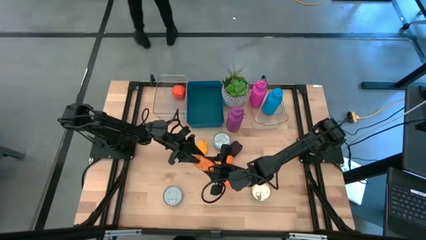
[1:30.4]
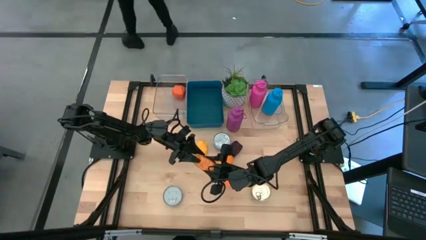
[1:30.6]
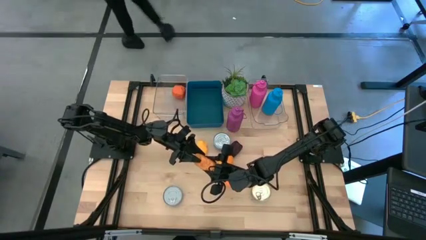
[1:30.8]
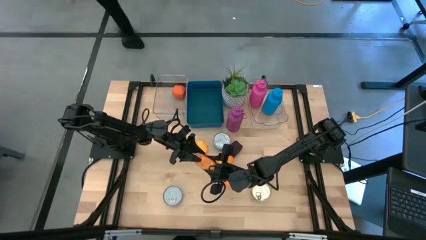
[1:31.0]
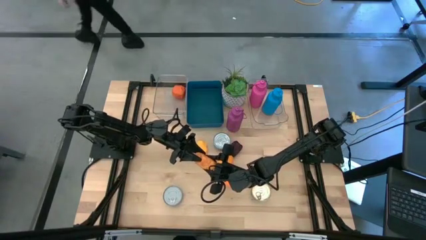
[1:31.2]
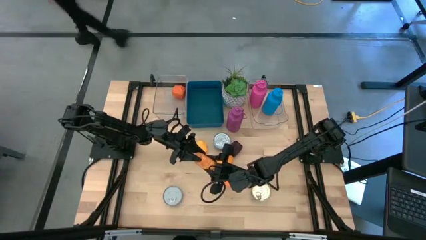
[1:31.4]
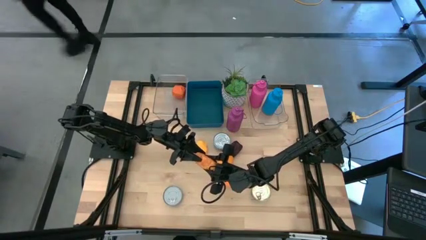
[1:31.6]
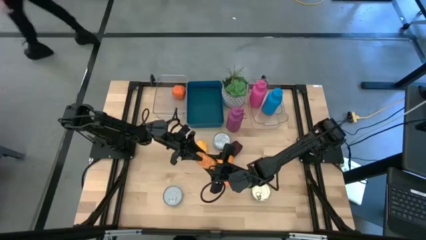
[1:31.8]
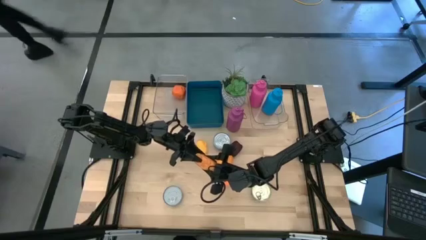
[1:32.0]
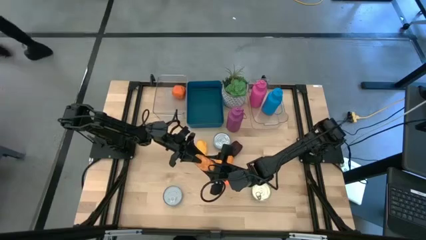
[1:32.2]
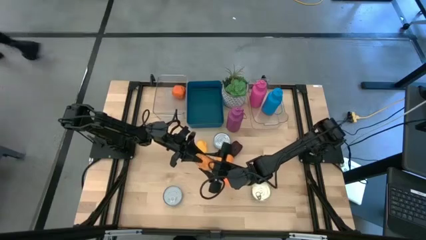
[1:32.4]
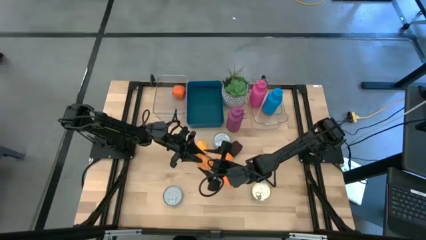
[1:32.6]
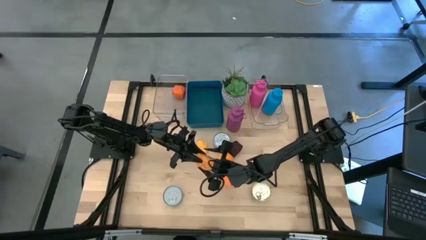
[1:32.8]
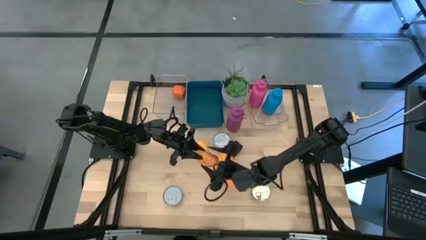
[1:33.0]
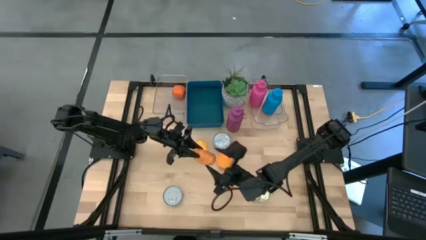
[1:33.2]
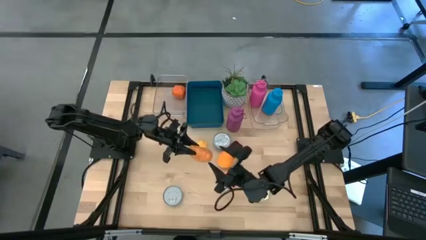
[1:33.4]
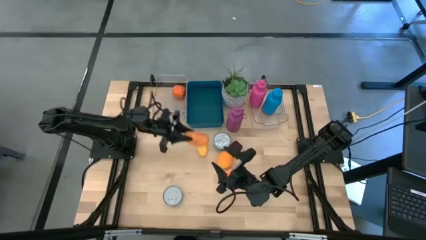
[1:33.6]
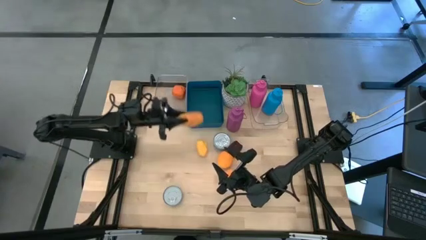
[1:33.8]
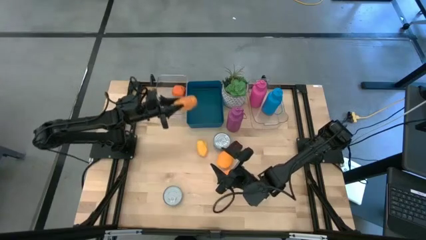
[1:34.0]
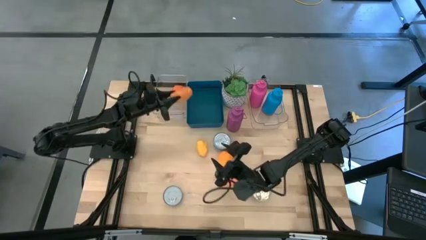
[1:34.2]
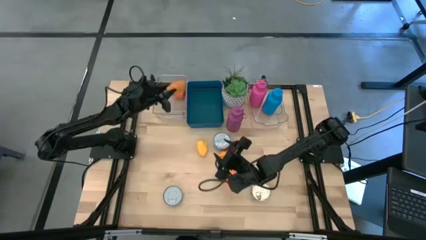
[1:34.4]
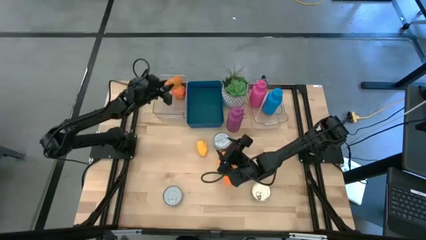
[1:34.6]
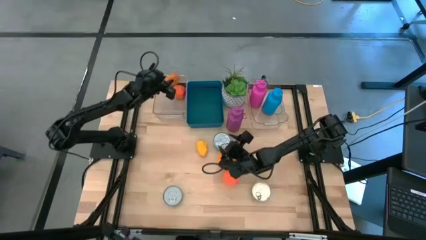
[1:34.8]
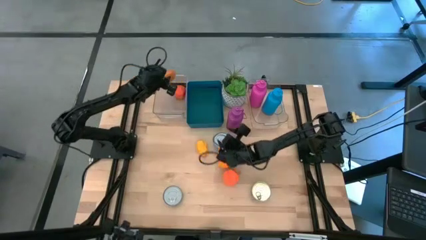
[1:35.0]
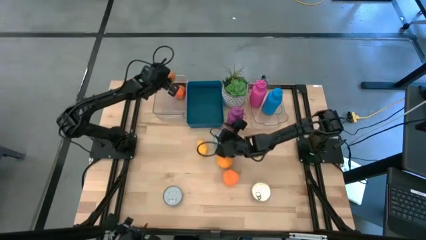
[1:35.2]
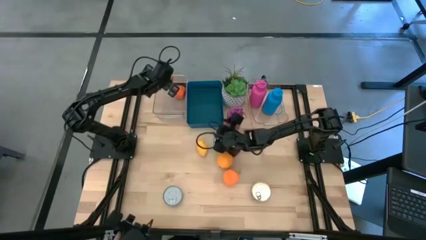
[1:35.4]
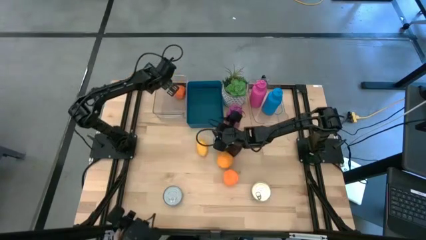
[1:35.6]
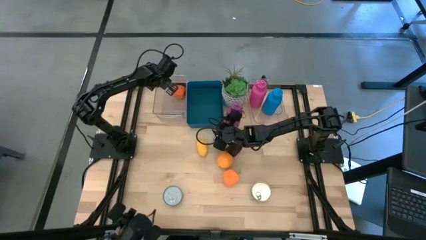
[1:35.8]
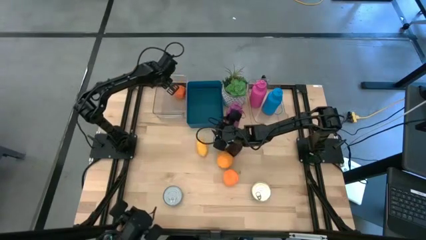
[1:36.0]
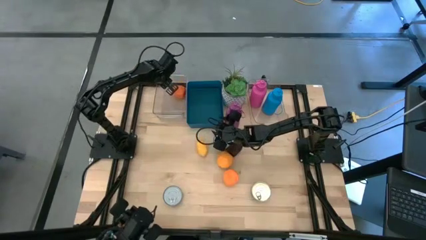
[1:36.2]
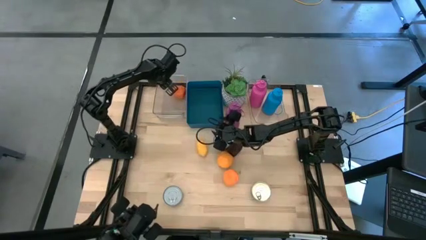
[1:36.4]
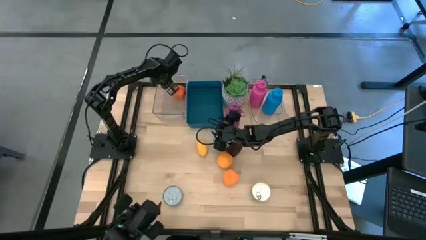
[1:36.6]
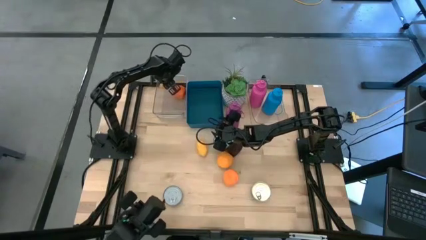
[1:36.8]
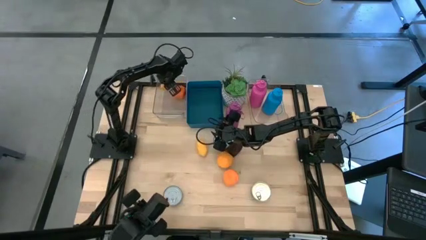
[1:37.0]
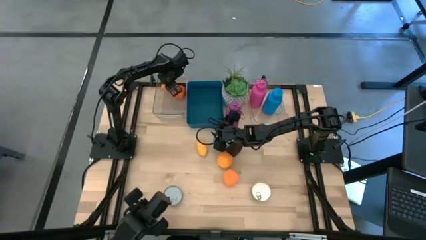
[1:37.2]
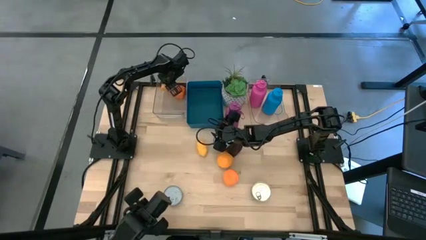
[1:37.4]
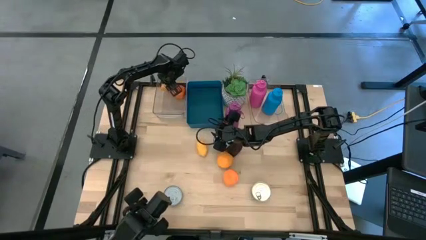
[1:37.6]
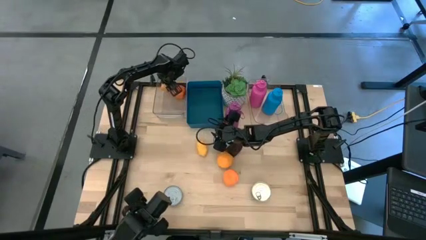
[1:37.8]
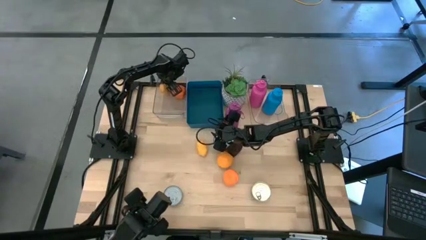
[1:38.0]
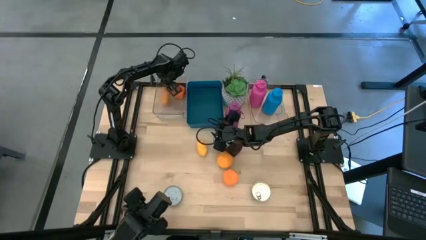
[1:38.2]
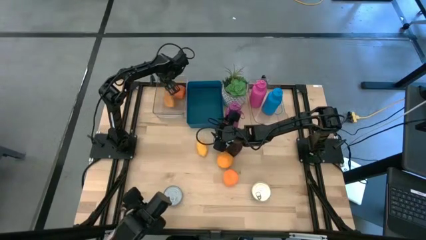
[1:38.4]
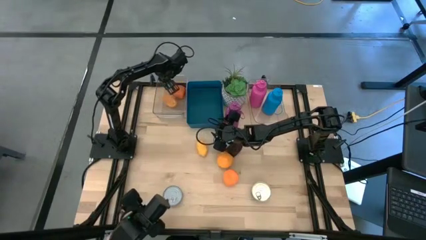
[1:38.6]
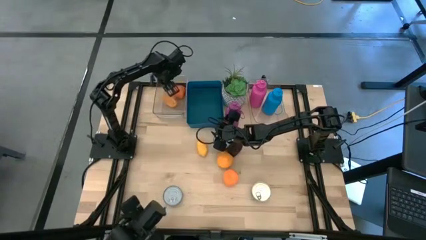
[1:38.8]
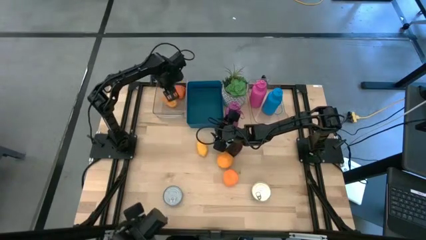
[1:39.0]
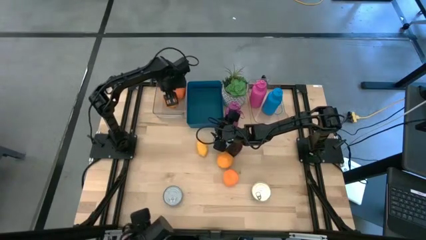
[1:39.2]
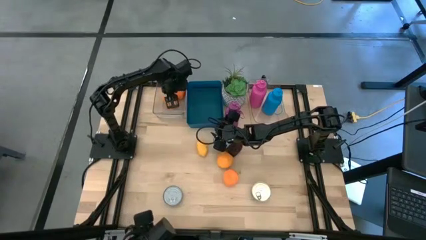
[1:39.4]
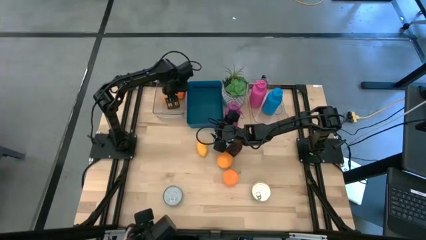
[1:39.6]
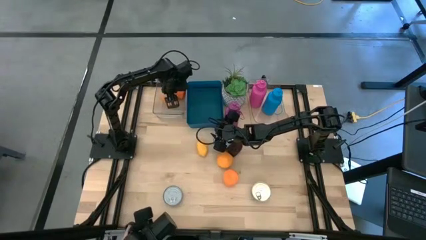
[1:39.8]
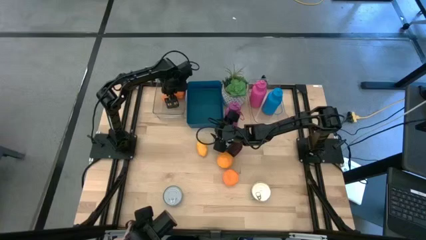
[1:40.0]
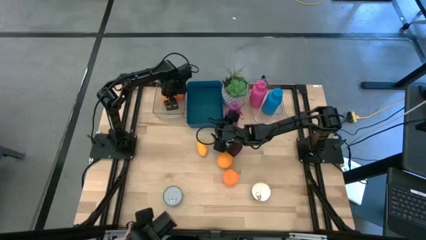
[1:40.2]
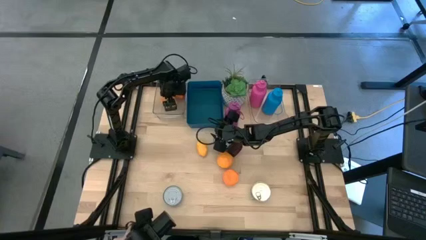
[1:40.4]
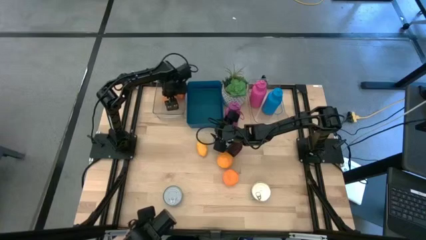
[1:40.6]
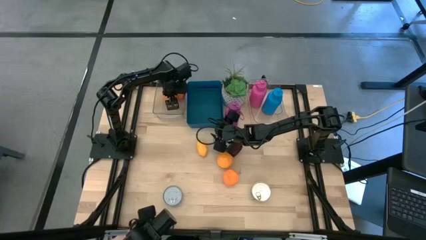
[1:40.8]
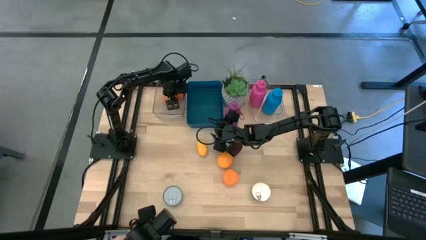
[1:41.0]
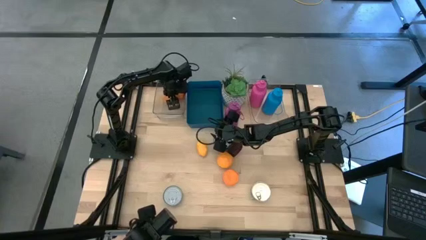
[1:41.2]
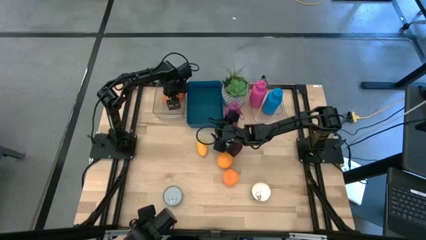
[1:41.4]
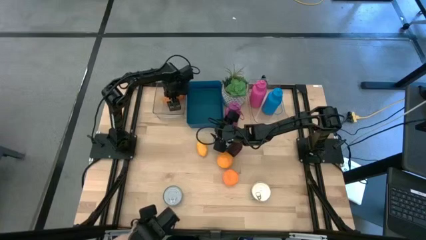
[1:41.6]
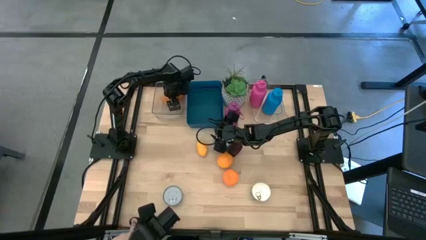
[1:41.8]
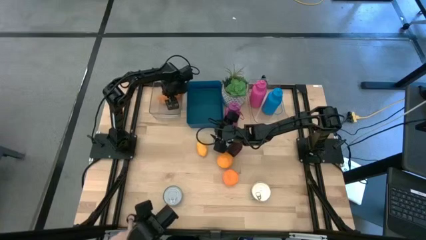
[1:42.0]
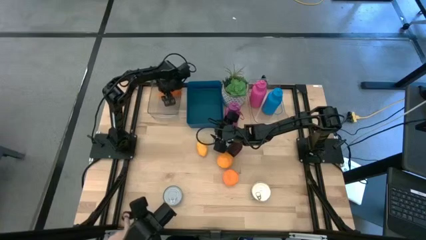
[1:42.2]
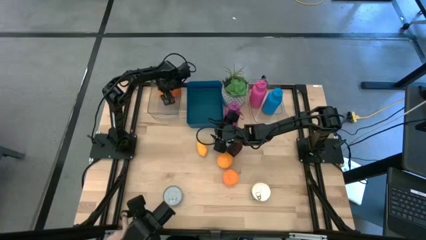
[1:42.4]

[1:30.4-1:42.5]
Task: Pick & Place Food Item
Put the mango into the left transparent bin

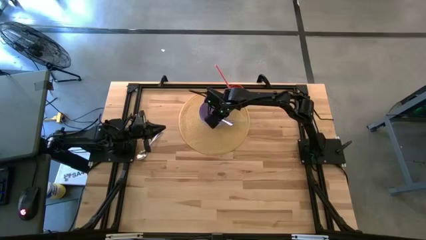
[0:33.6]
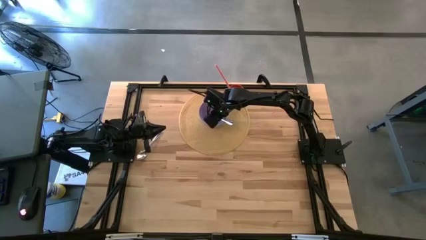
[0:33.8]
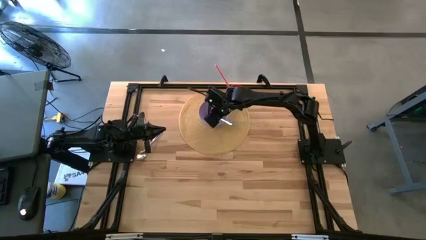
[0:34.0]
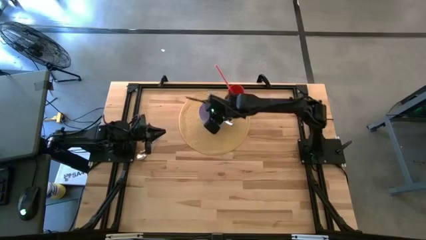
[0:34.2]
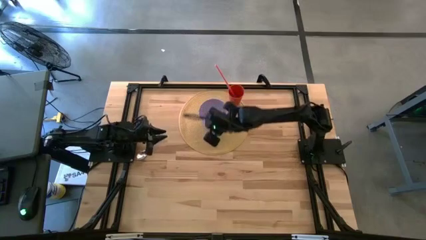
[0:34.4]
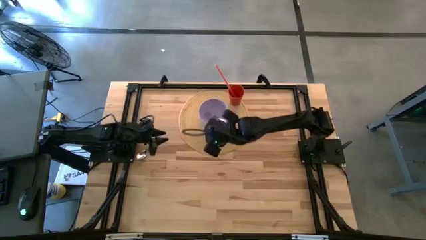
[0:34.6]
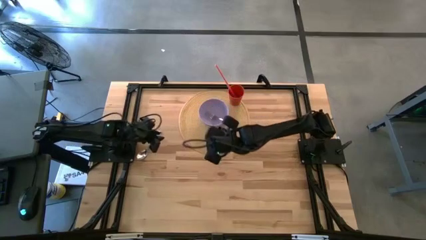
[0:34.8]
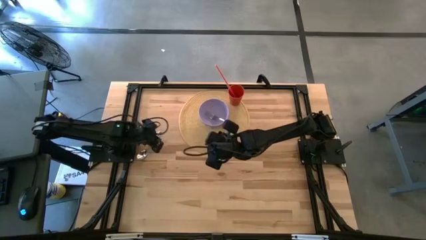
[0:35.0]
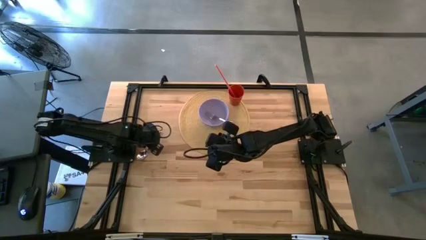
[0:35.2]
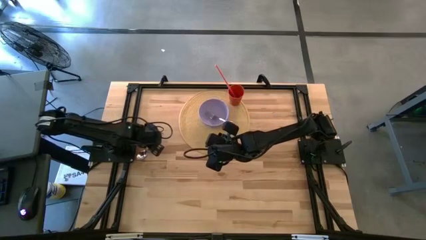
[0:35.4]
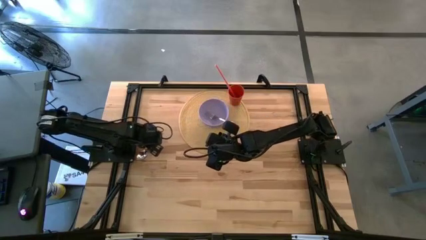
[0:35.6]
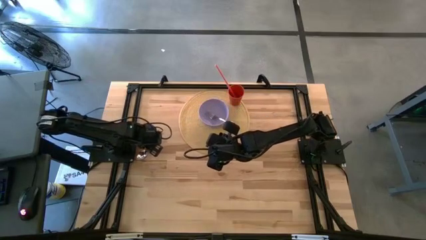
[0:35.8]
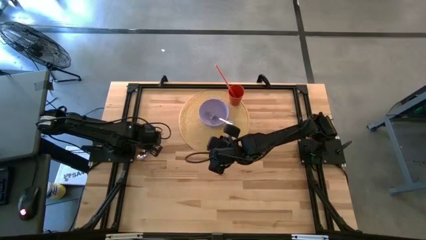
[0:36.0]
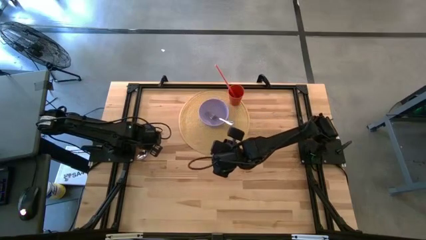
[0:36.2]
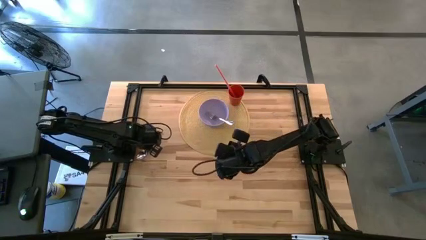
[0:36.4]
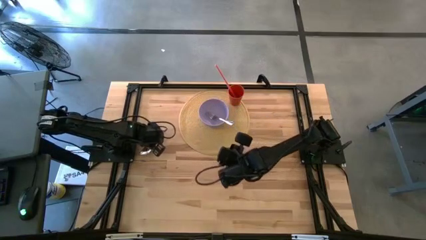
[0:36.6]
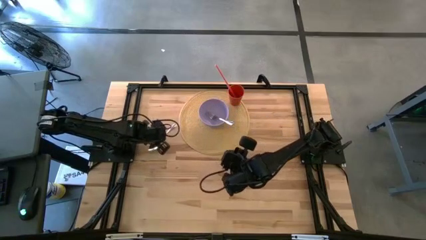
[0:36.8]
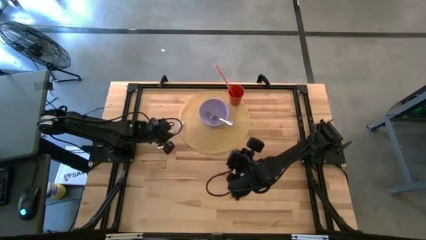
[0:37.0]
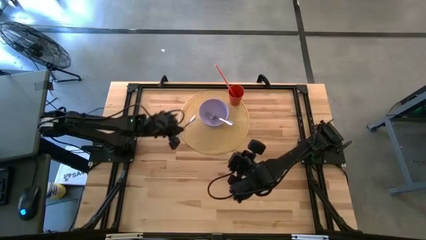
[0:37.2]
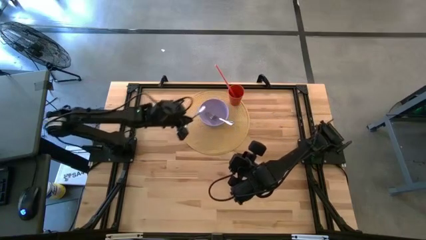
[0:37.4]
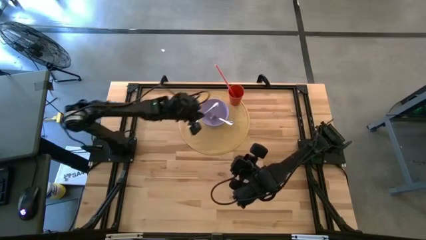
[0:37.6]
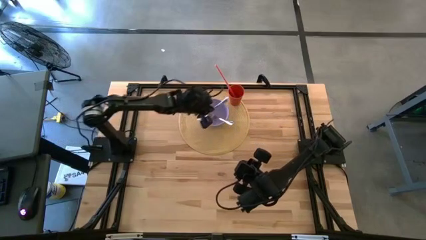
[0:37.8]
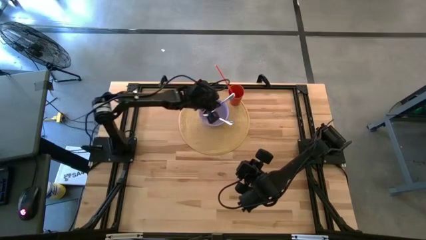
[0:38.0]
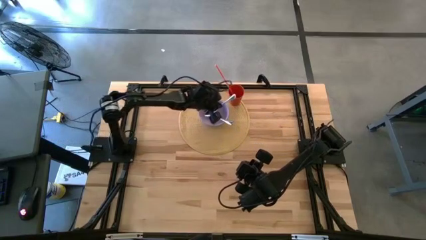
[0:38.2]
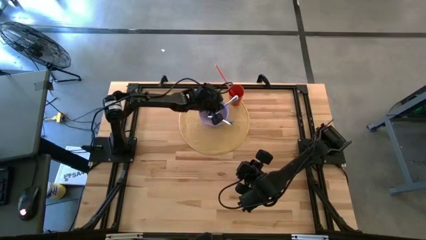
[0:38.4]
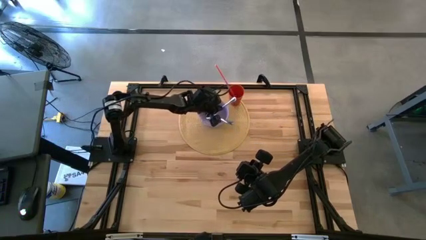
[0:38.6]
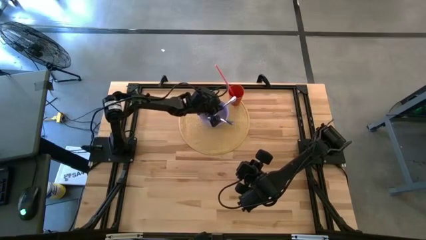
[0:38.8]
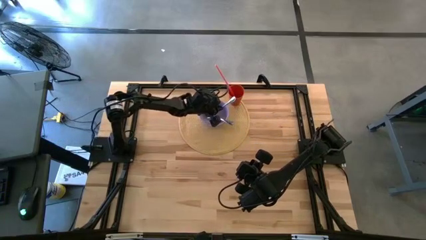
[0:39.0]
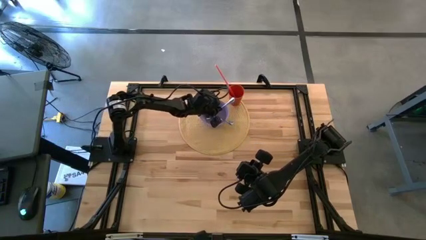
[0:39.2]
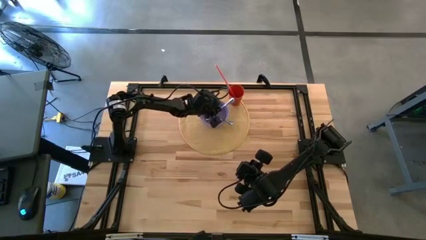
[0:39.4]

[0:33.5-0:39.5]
Task: Pick & Place Utensil
Put the silver spoon into the purple bowl
